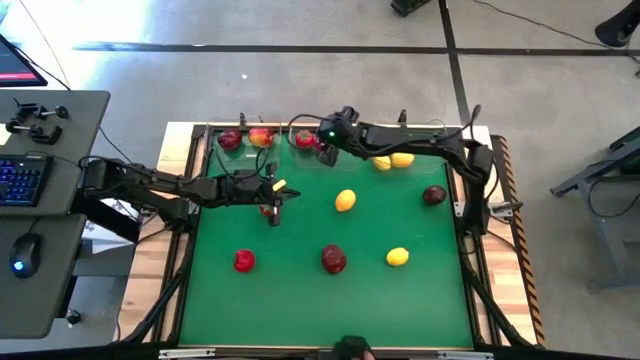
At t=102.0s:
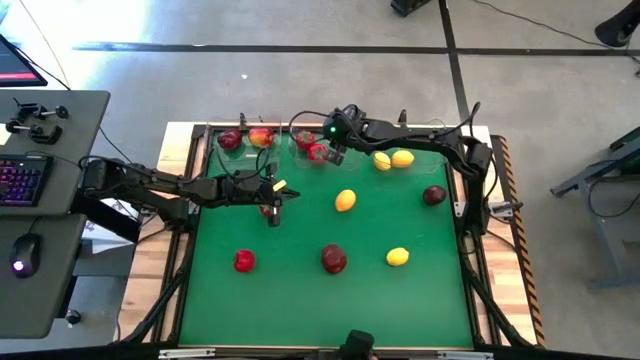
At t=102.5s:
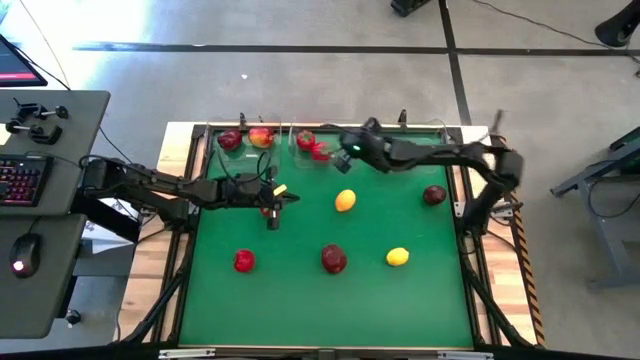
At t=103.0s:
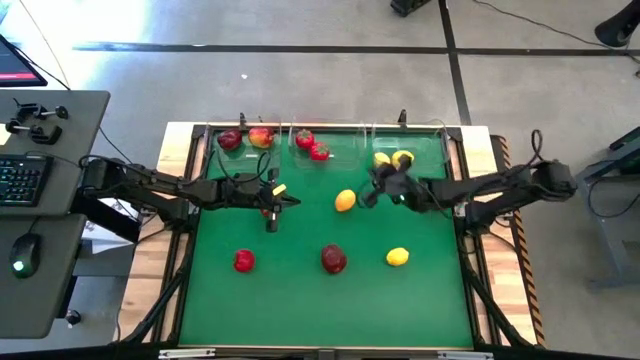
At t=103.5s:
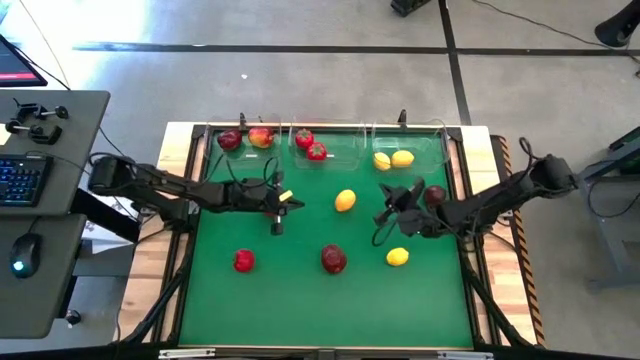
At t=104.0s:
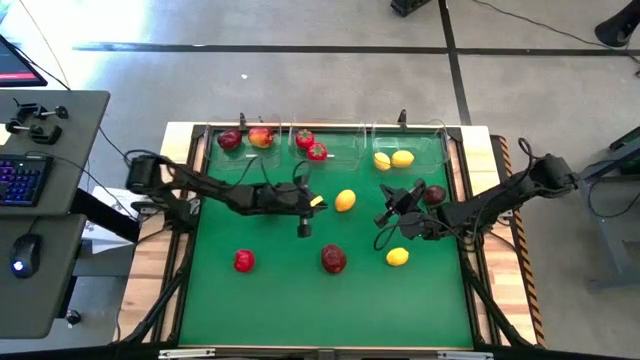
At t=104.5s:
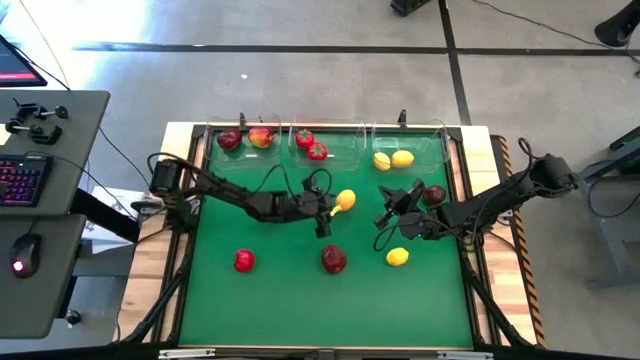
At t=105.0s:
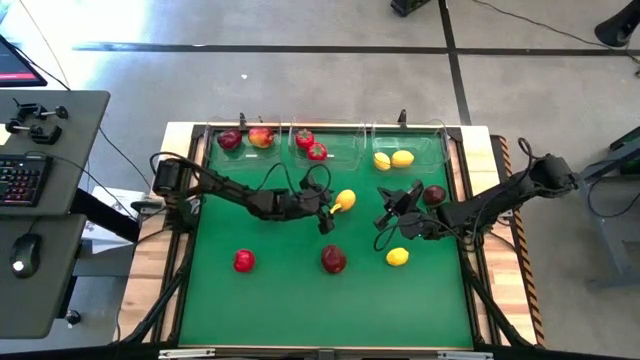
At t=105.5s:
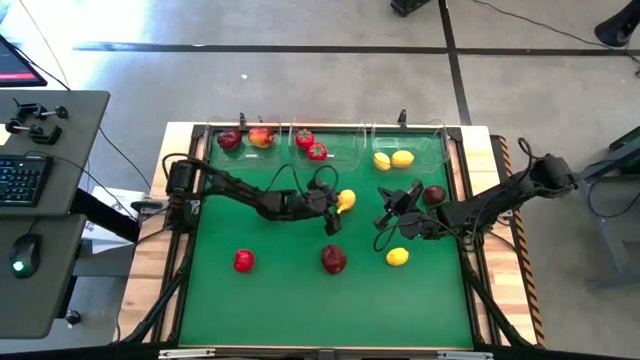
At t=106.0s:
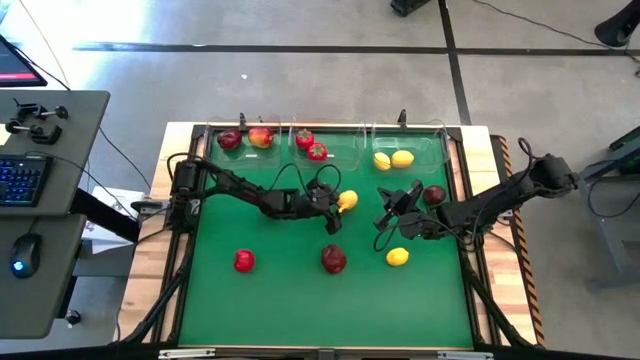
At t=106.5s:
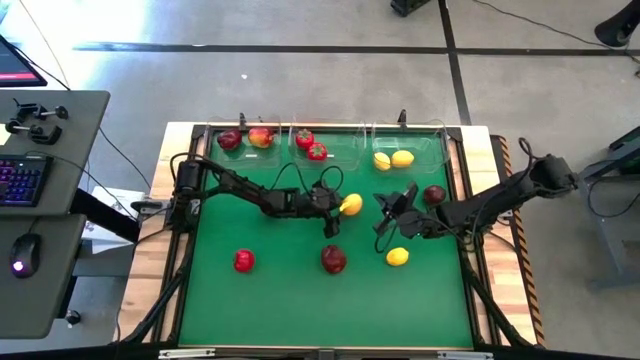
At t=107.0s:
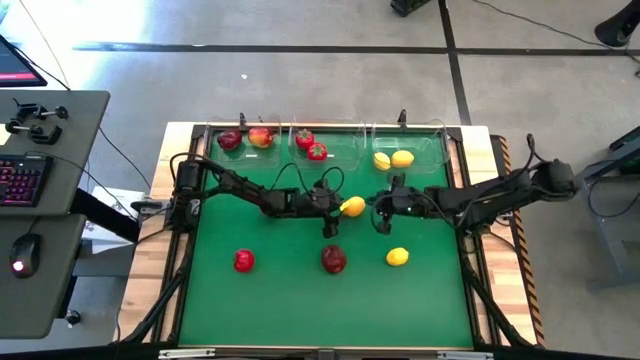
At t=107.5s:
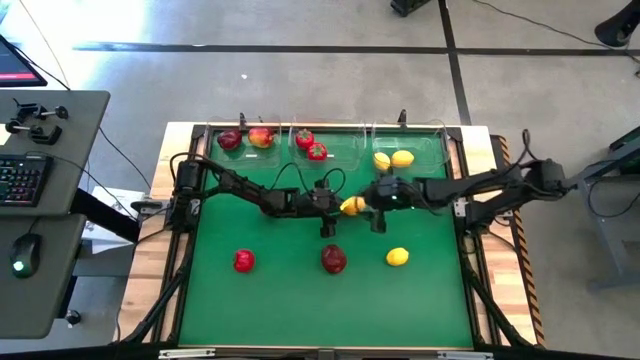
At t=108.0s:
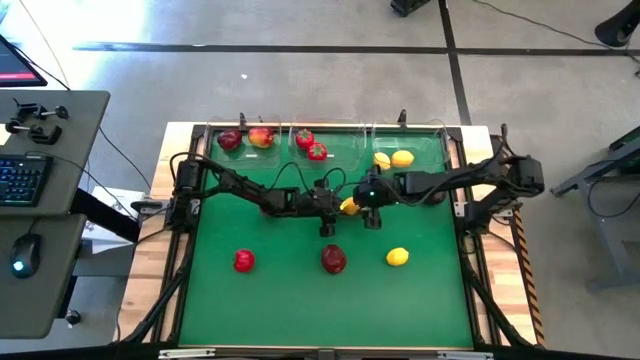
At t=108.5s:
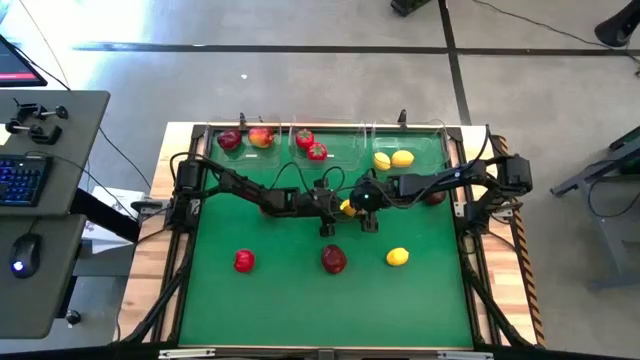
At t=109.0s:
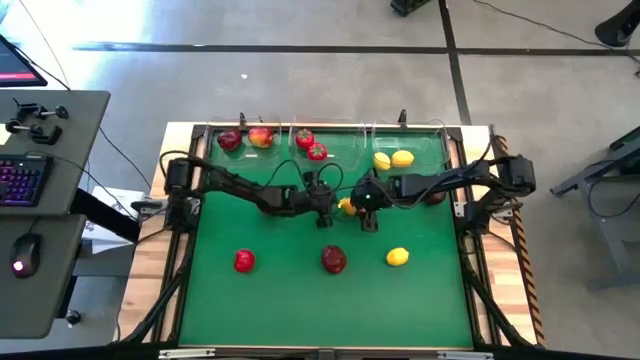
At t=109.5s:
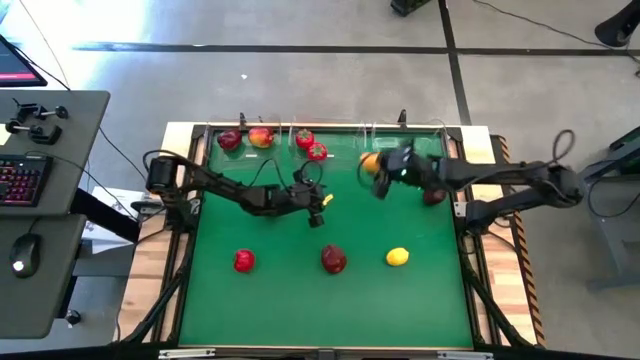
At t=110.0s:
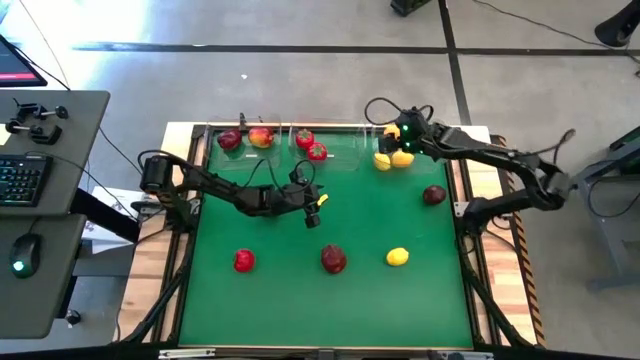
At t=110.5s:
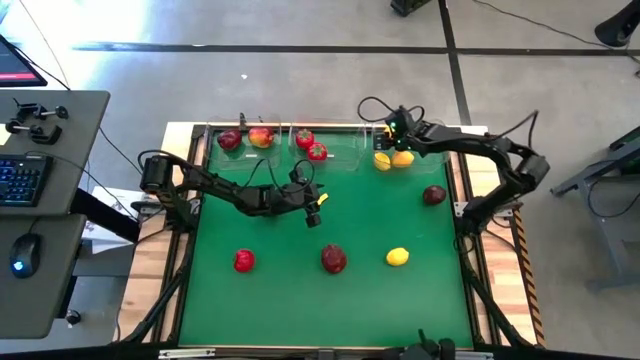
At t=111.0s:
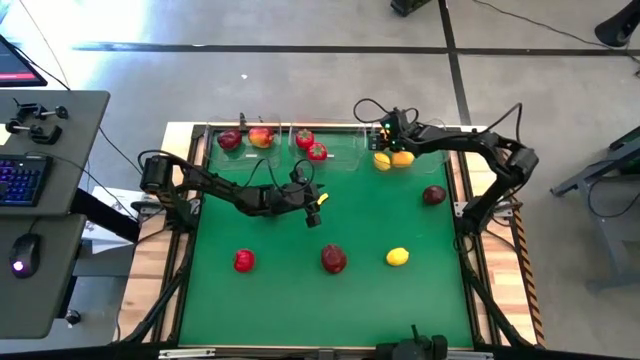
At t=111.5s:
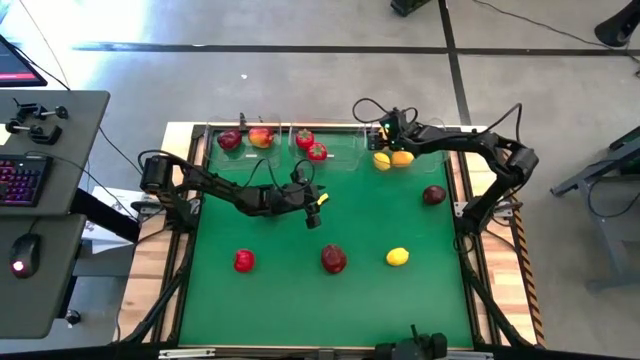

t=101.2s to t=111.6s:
Task: Sort produce into baskets
Put the top lemon into the right transparent bin

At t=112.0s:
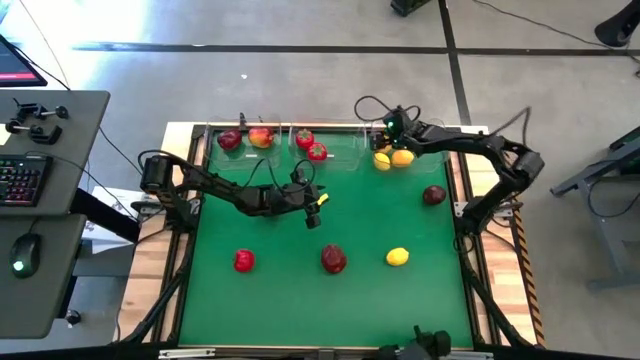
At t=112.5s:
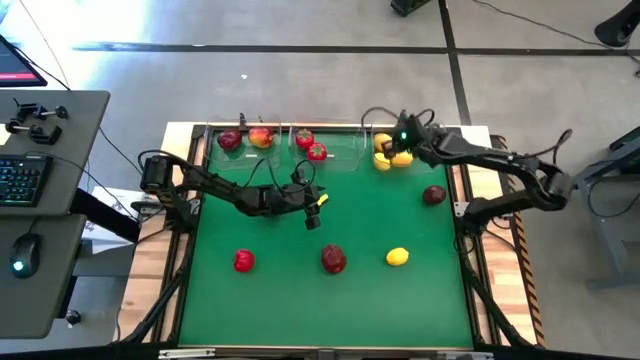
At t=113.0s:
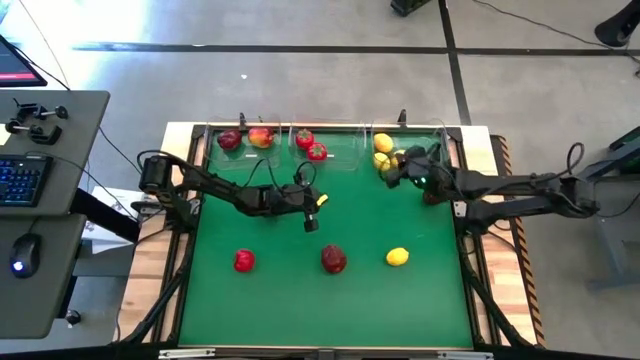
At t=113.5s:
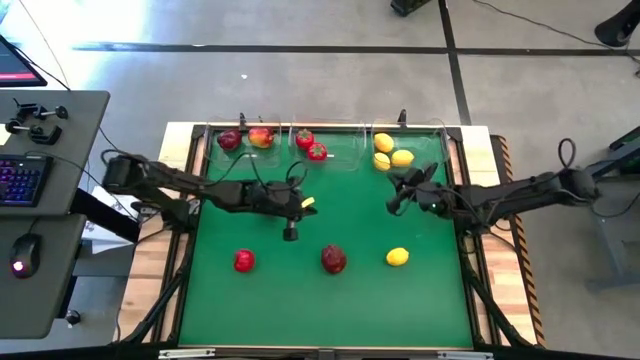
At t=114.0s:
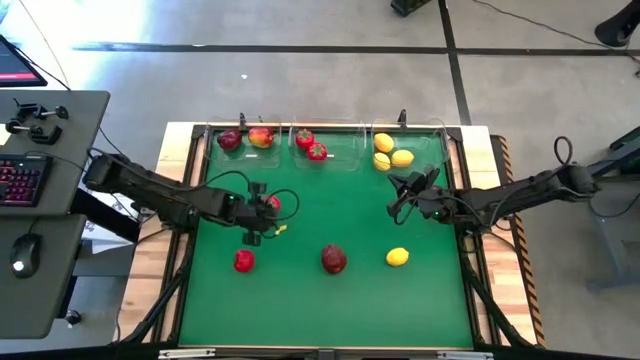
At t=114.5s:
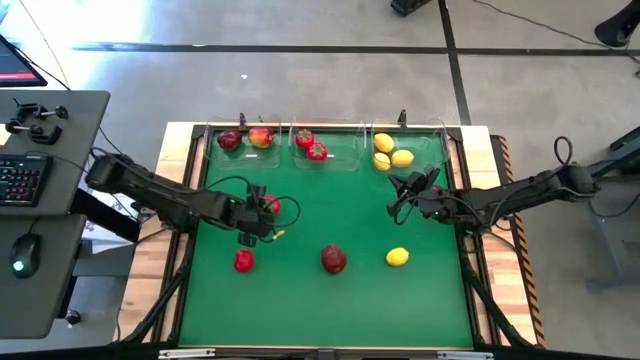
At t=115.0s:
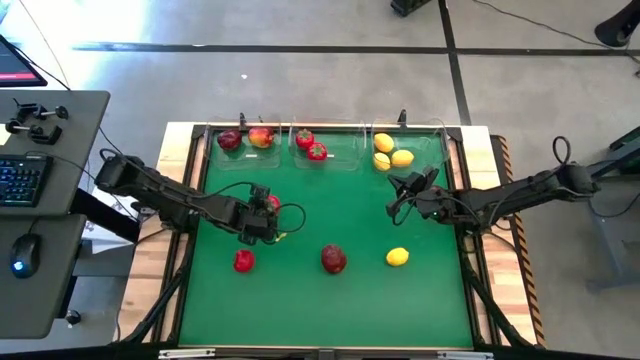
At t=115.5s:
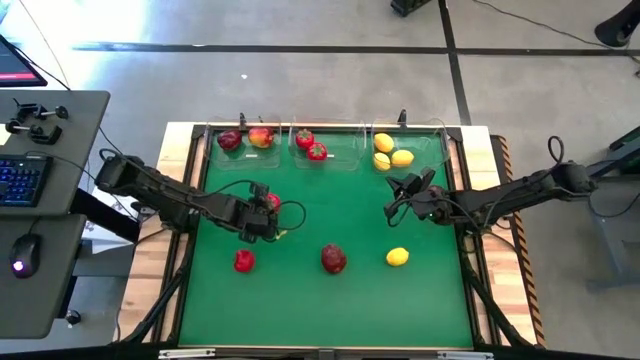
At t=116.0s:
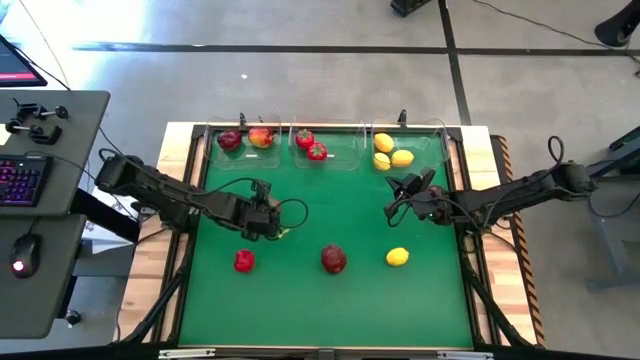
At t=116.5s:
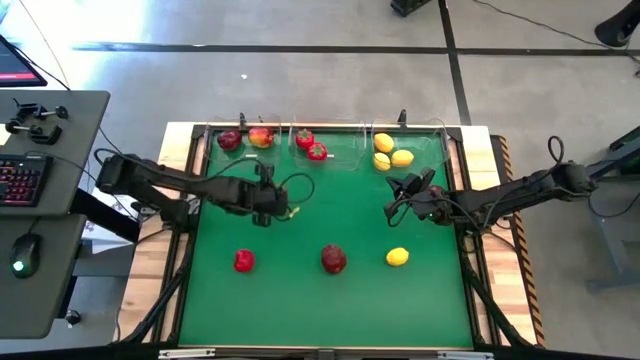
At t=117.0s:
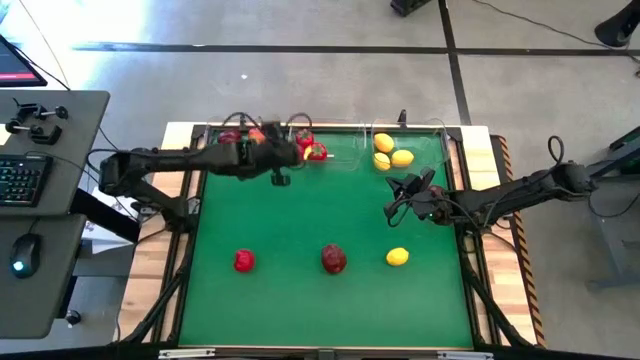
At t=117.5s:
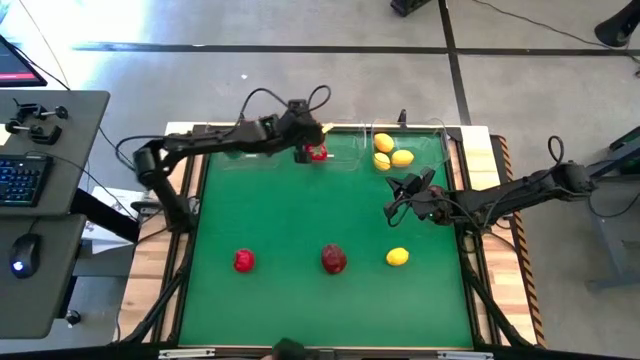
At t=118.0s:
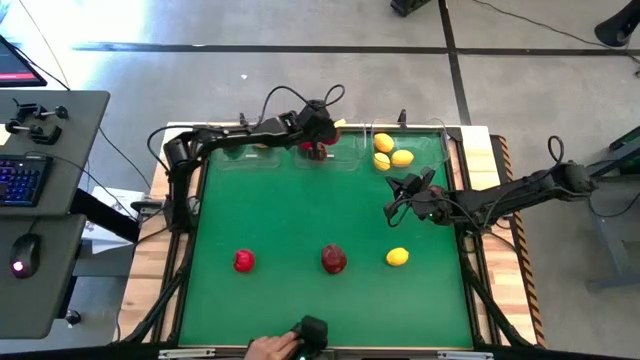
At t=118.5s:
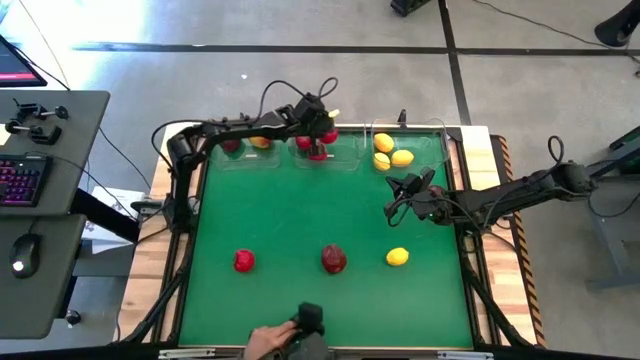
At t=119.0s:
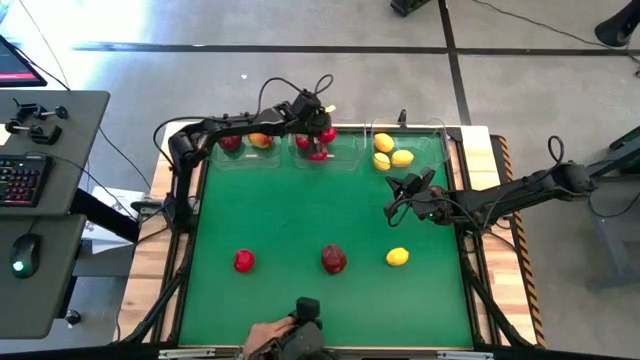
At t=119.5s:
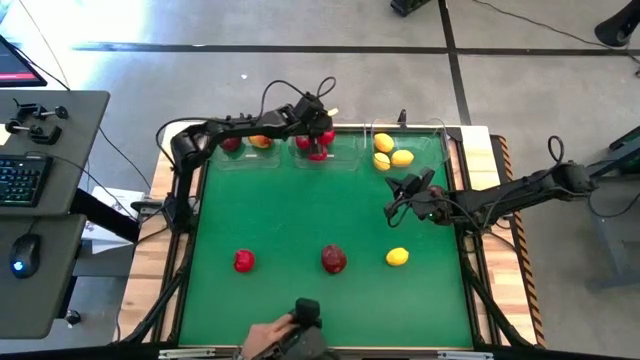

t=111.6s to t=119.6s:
Put the top tomato into the middle transparent bin

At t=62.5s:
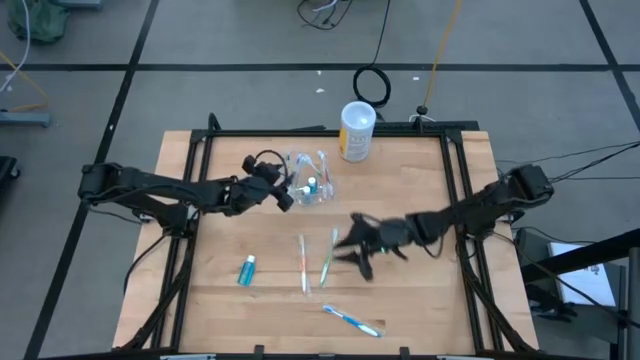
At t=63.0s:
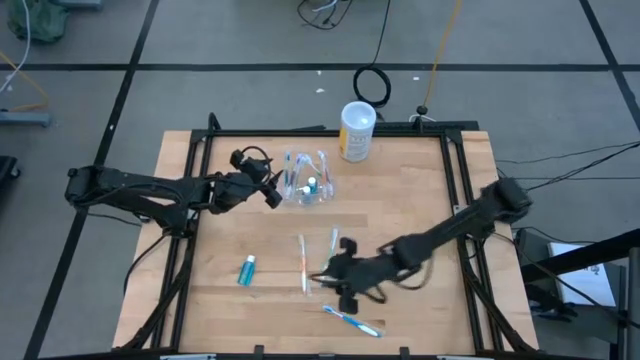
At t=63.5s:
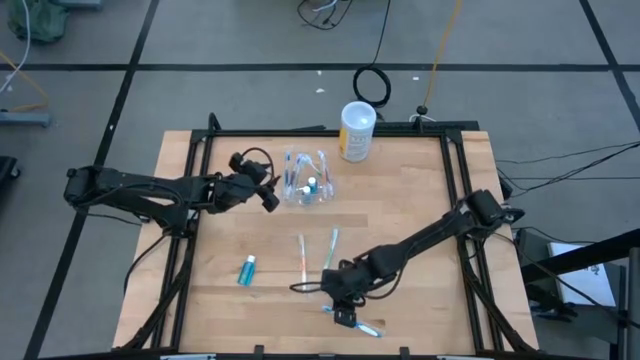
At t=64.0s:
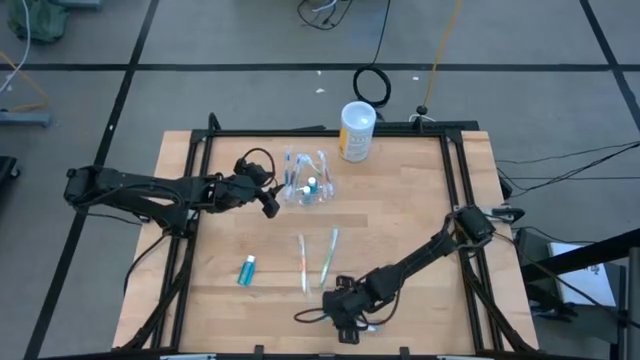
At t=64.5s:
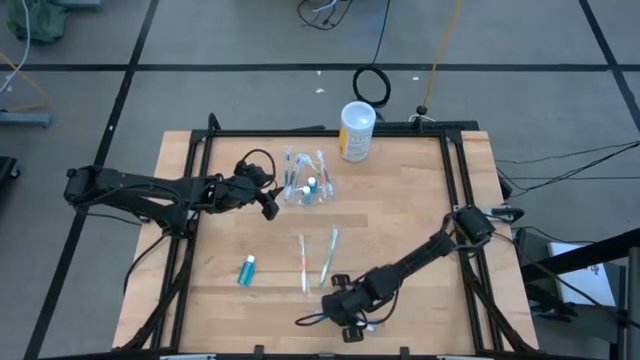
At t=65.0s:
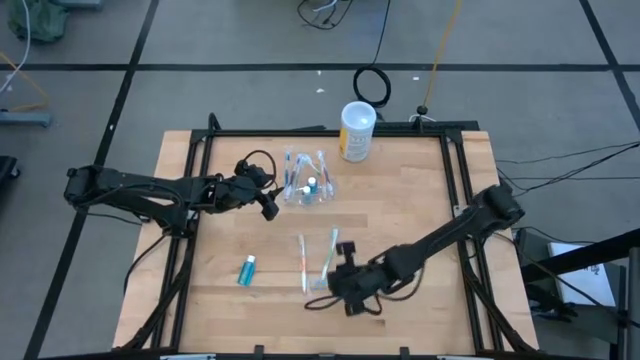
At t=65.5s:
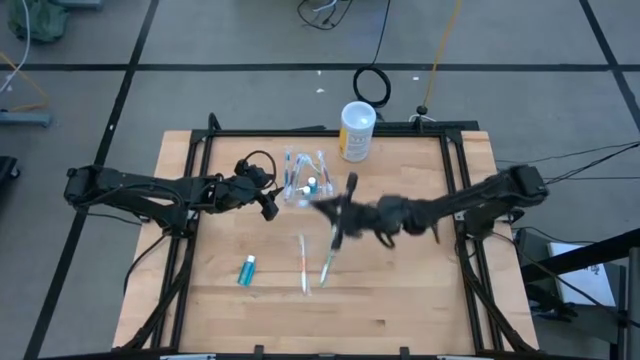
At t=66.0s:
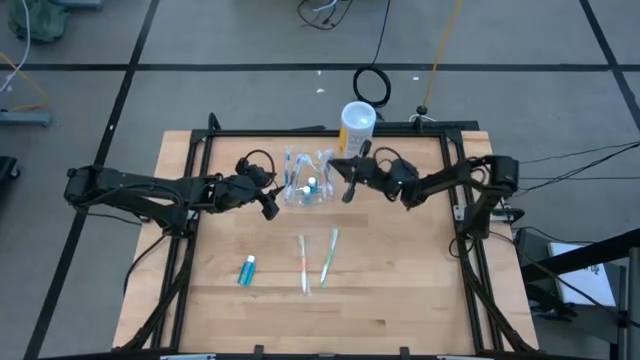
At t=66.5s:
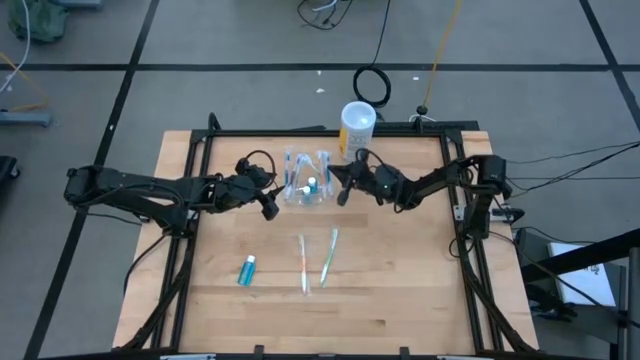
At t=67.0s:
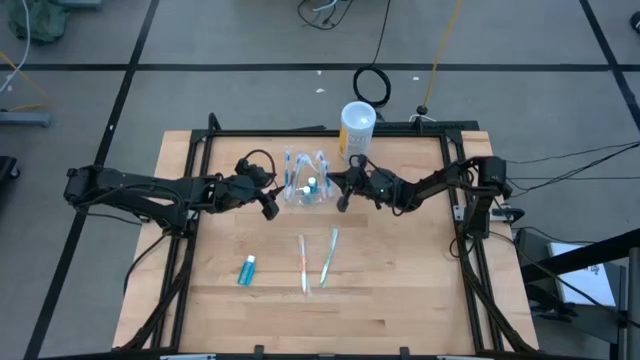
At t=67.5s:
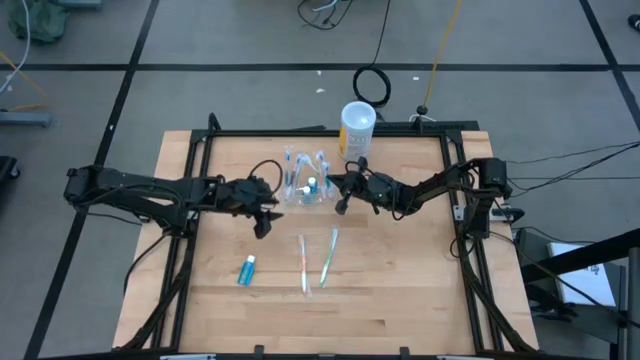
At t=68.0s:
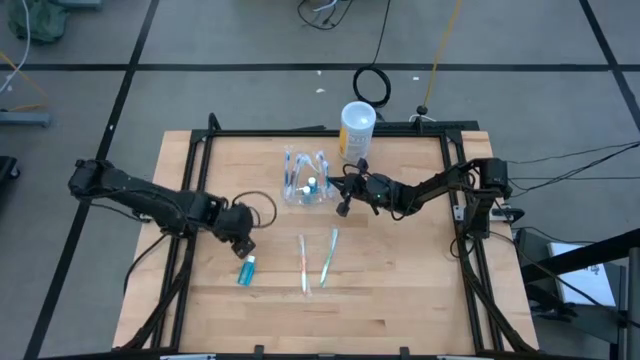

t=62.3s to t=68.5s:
Task: Pick & Place toothbrushing station
Put the blue toothbrush into the transparent organizer
